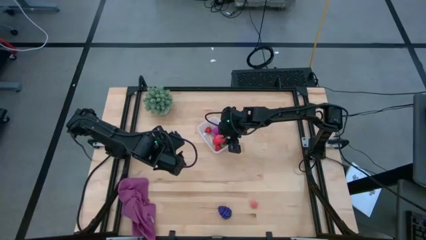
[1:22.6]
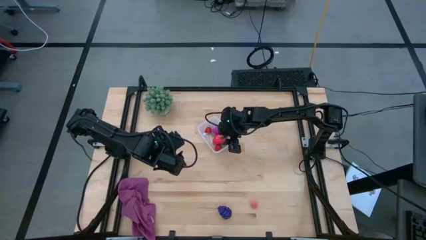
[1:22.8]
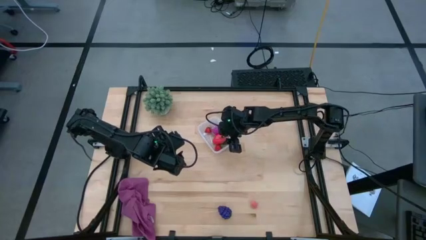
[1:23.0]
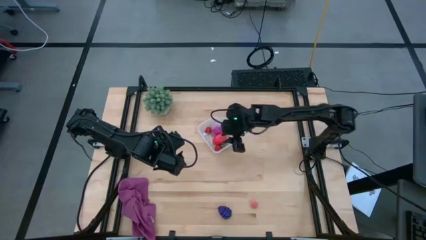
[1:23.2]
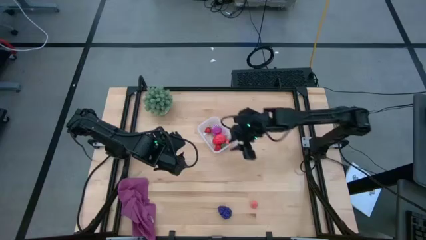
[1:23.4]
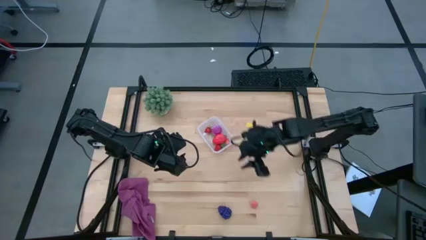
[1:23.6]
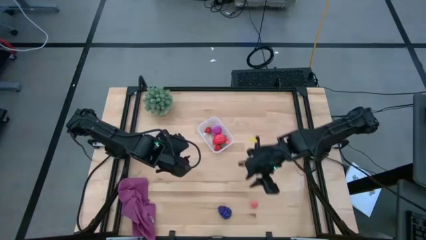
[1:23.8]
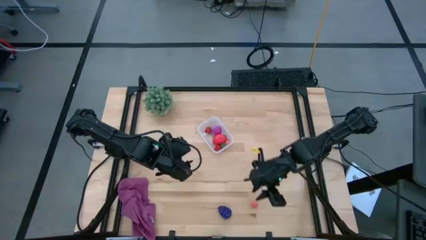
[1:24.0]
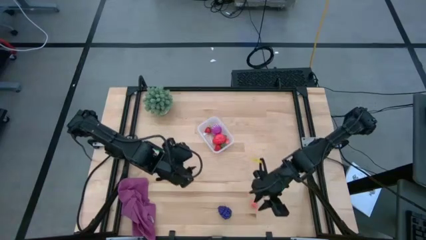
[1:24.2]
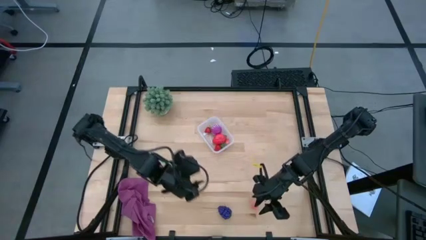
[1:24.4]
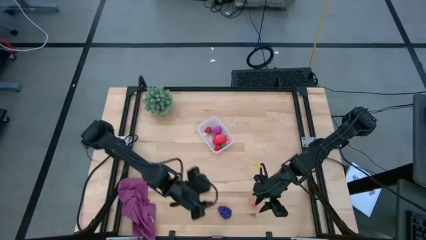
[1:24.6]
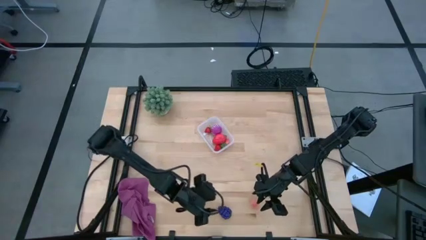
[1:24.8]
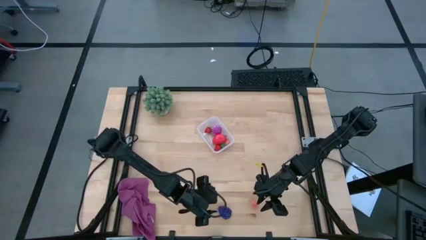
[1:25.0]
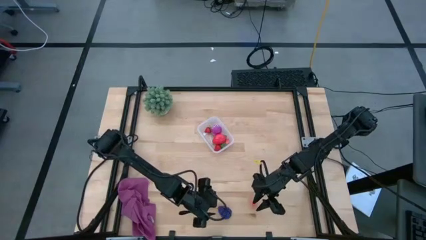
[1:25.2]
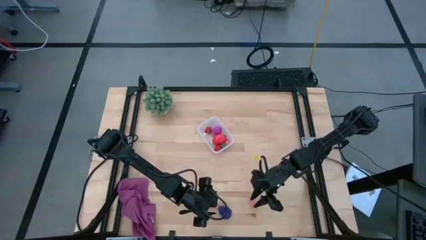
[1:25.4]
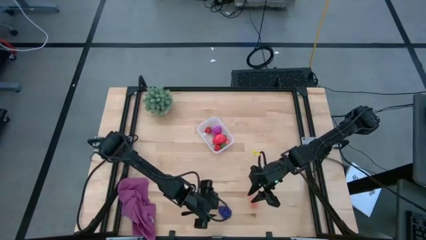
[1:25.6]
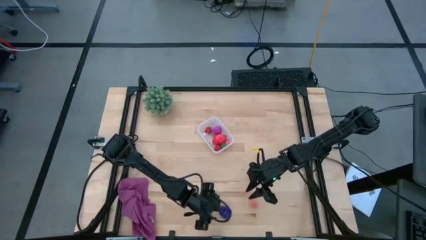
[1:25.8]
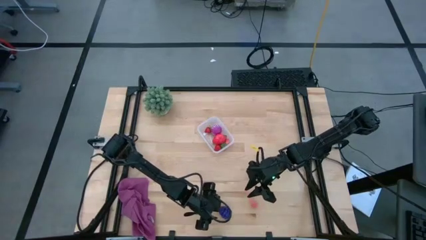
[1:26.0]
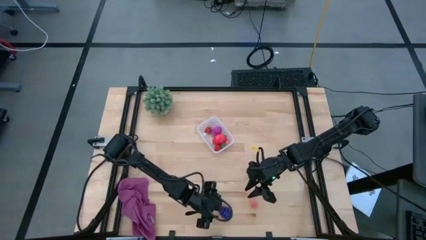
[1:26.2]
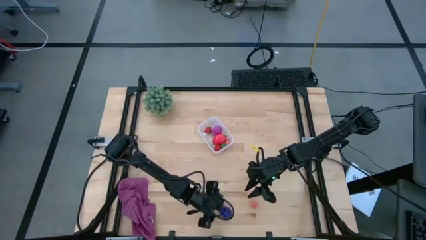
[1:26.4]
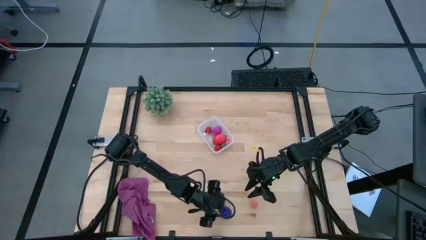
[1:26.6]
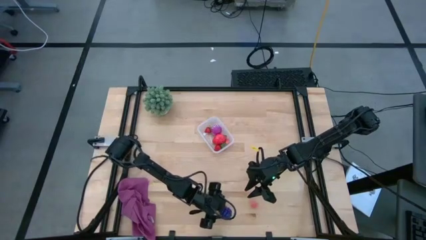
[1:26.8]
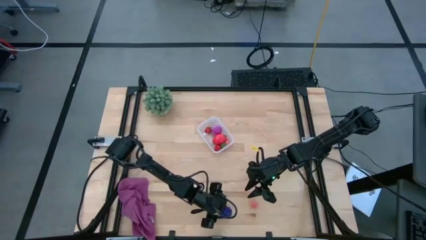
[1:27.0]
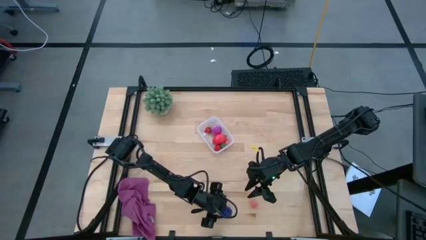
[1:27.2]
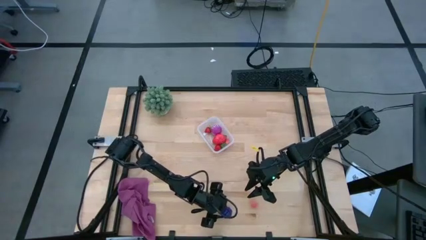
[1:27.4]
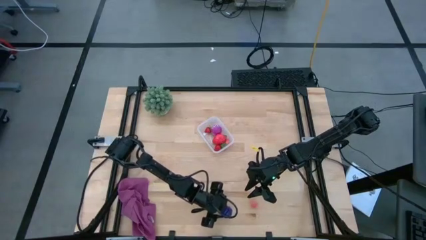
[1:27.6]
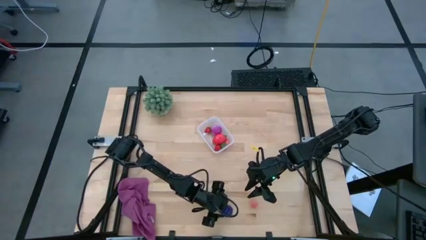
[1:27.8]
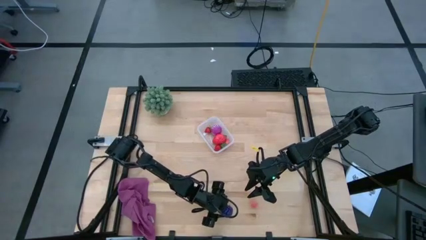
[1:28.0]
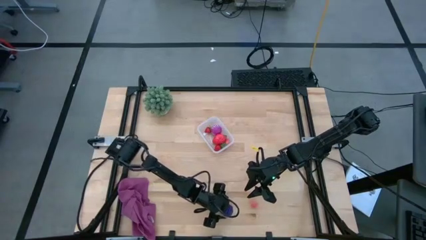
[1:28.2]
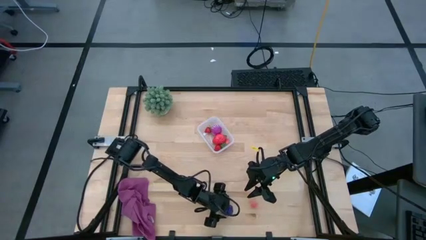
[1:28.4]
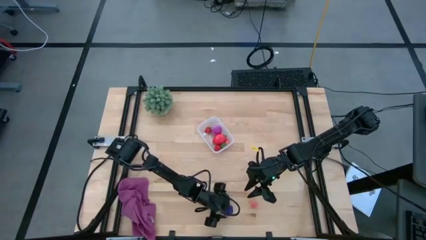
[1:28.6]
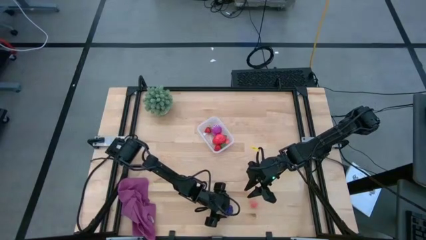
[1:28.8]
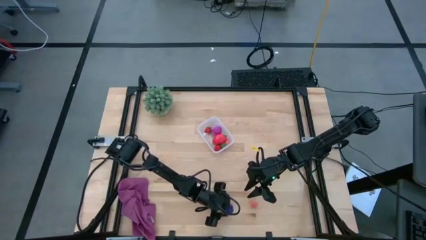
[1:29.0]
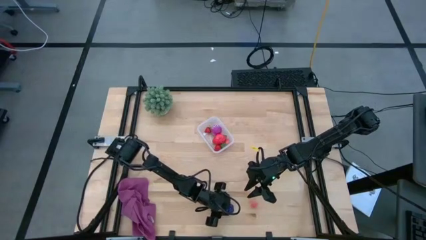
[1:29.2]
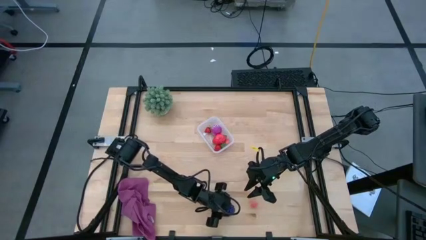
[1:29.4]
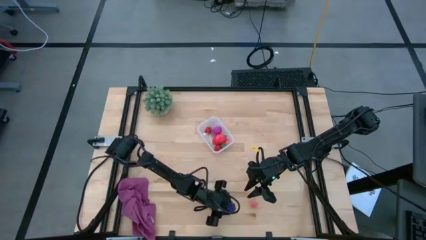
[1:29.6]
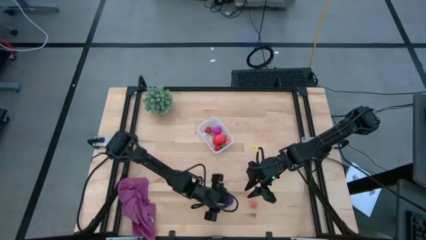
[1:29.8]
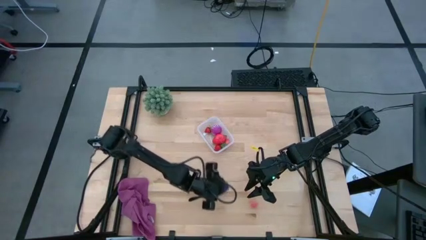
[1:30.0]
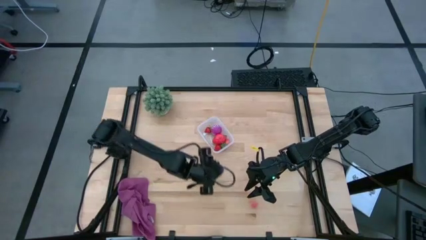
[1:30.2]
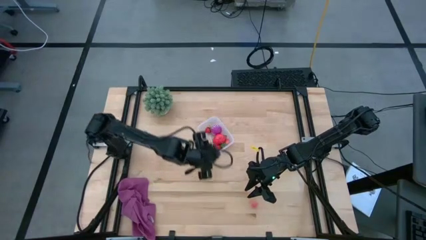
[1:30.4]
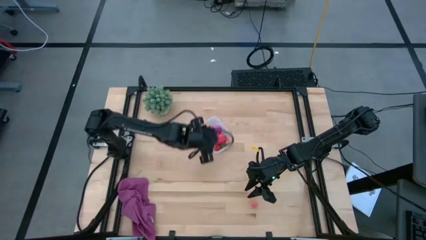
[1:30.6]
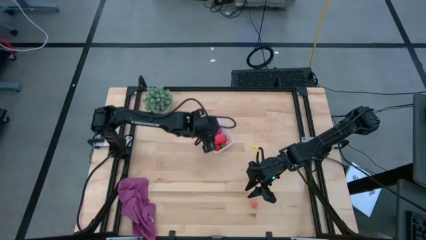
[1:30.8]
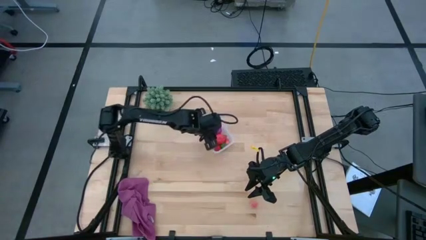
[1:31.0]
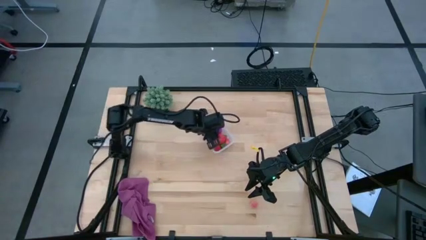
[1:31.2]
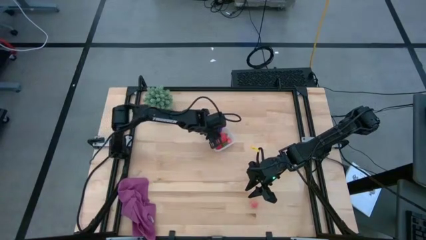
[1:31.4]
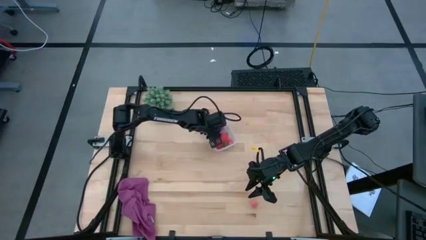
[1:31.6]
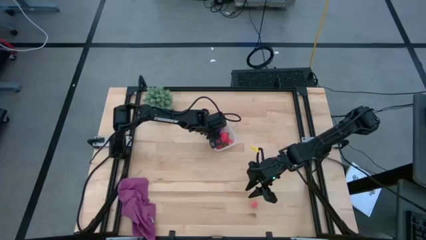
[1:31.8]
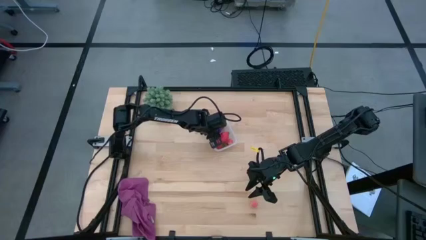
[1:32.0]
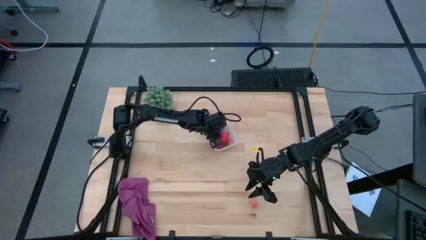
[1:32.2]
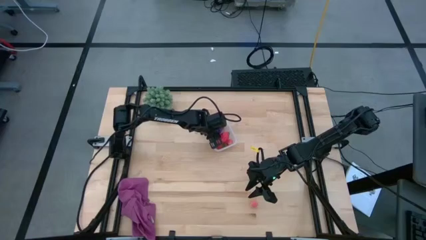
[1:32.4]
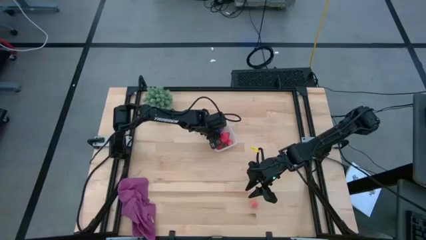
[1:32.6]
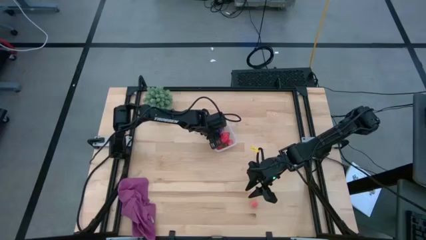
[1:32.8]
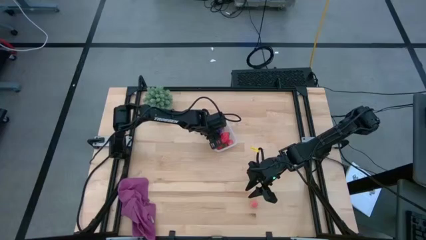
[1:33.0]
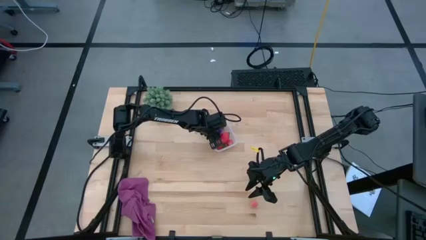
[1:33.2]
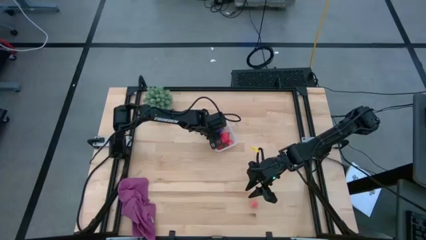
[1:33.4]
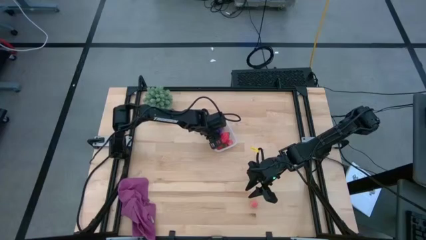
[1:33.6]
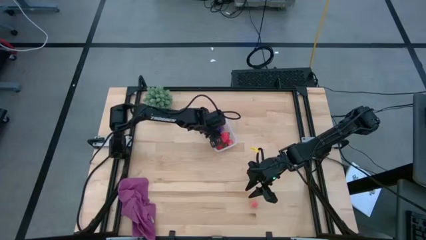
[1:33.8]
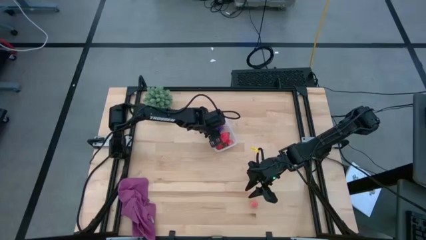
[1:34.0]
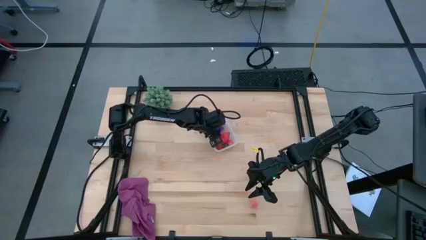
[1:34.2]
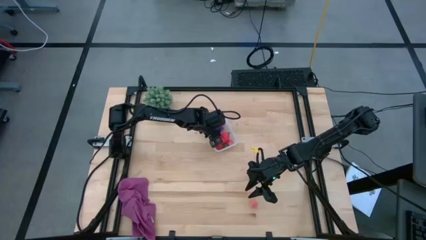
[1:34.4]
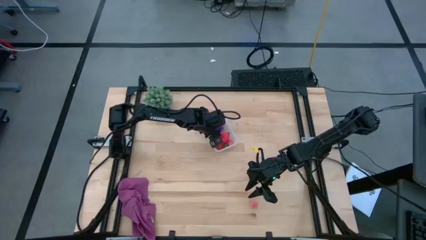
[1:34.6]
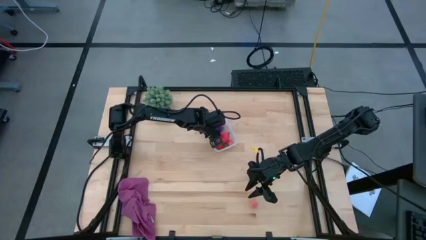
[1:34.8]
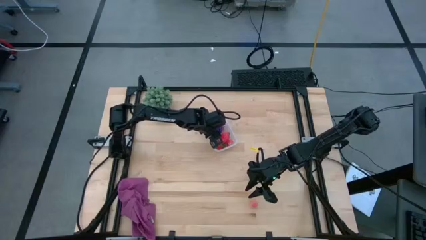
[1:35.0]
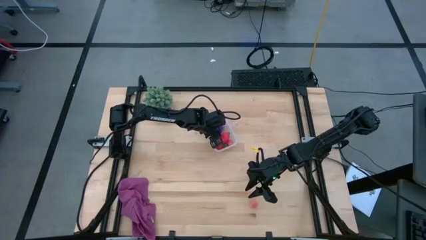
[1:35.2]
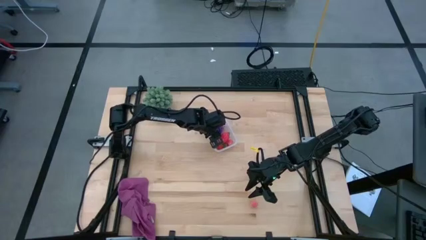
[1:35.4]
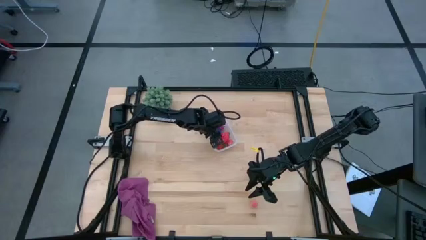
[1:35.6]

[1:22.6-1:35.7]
Task: Pick and placing Produce into tupperware
Put the grapes into the transparent bin

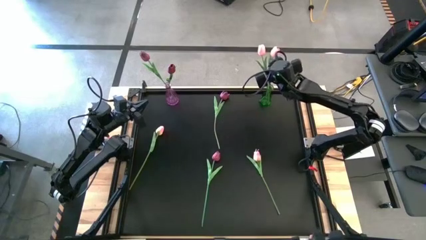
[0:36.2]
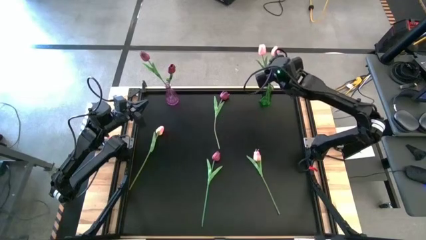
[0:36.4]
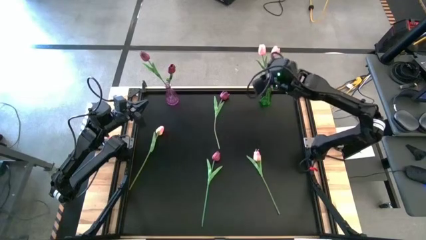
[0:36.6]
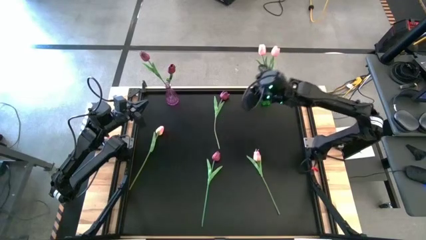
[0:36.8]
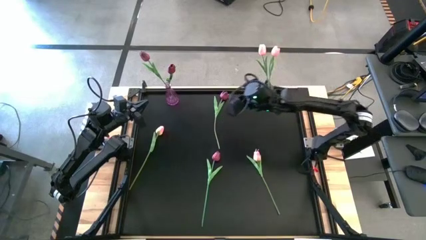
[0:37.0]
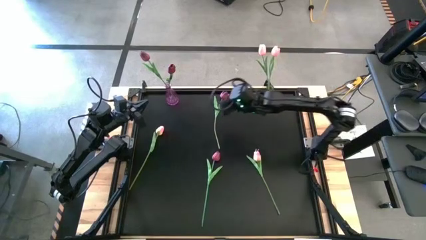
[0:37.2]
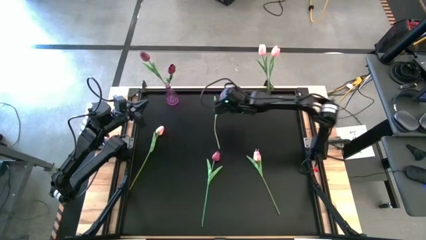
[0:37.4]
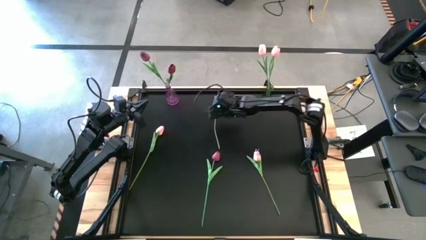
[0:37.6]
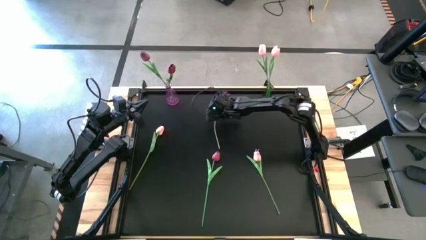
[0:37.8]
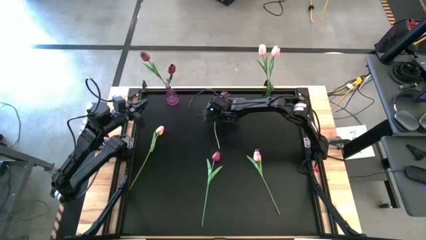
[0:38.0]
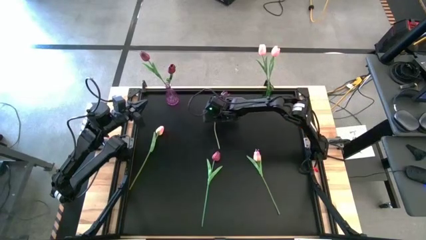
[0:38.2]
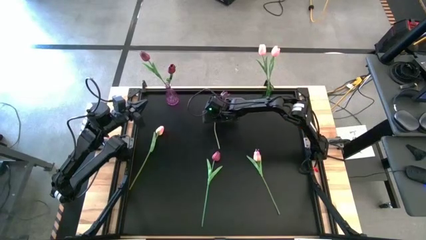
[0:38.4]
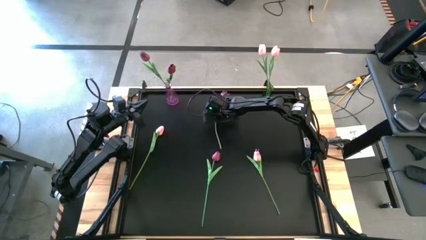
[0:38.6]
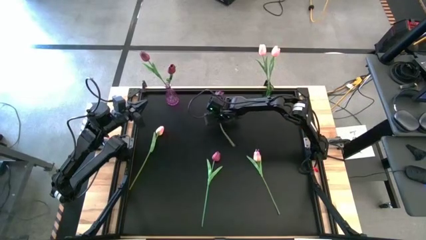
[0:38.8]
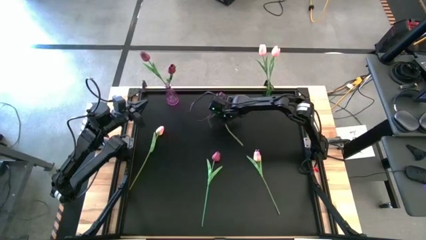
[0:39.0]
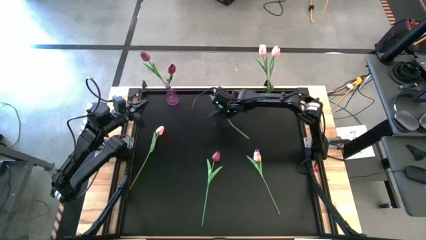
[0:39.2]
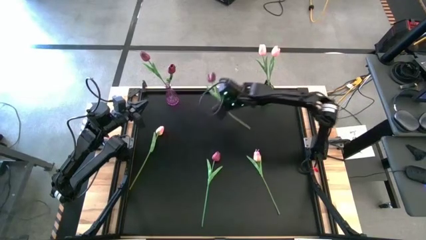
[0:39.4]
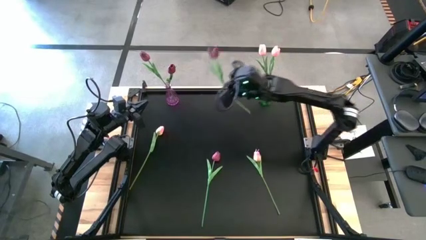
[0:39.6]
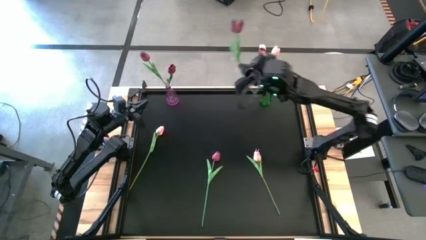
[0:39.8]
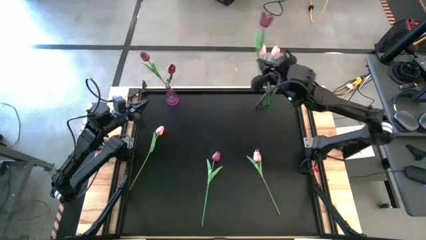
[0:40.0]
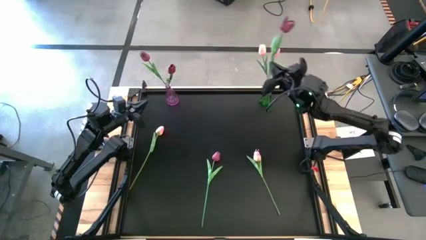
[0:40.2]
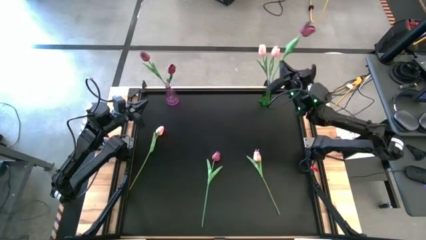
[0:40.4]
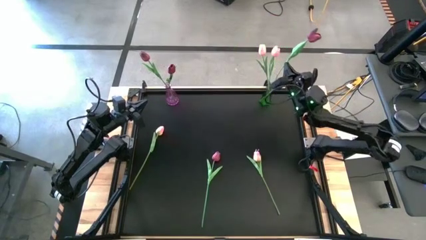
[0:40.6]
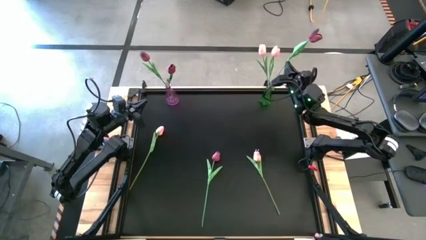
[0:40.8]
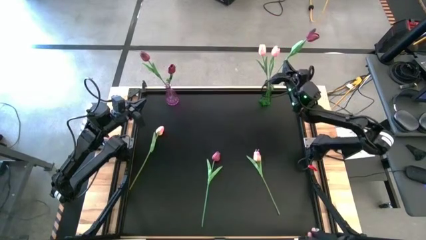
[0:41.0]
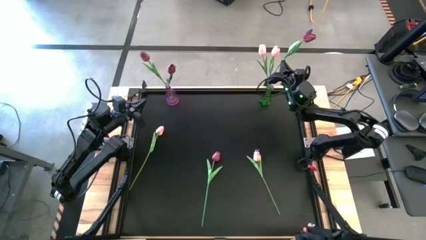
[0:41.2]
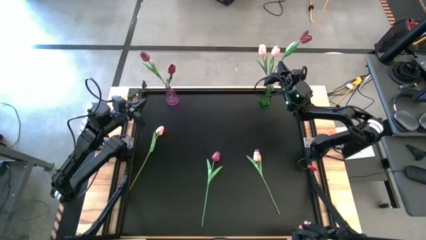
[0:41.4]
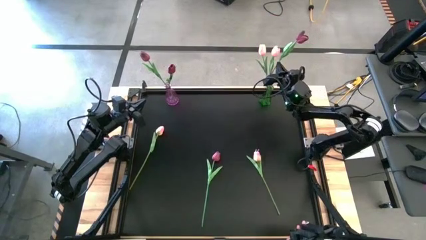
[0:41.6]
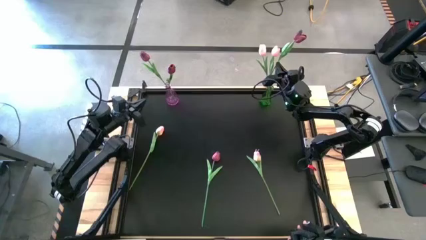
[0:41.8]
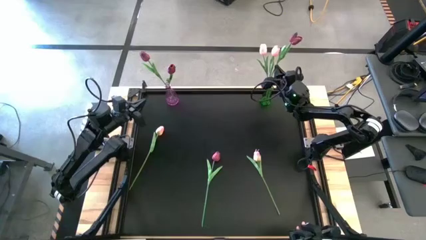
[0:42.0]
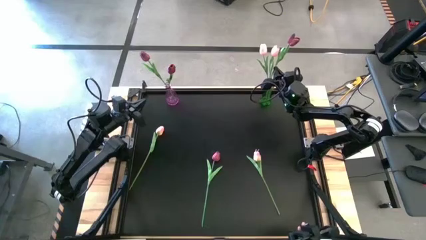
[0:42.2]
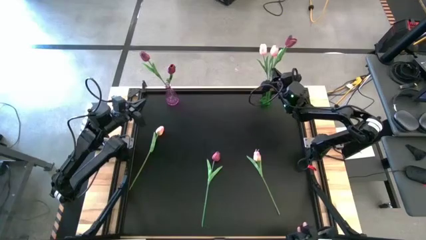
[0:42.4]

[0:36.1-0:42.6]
Task: Sort flowers into vase by color
Put the top red flower into the purple vase
